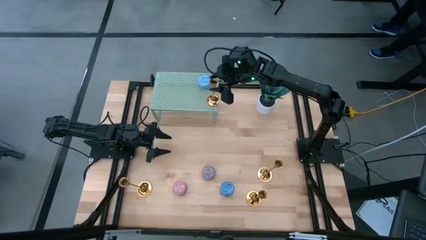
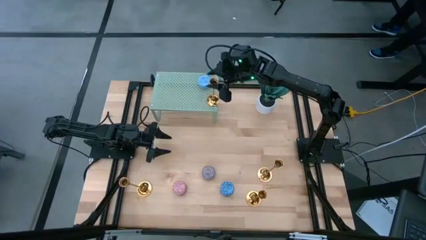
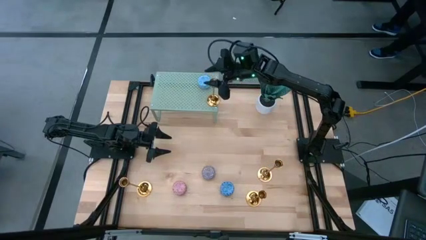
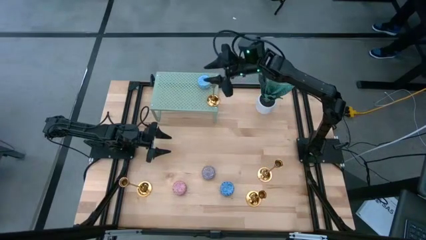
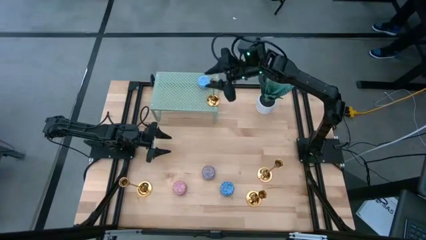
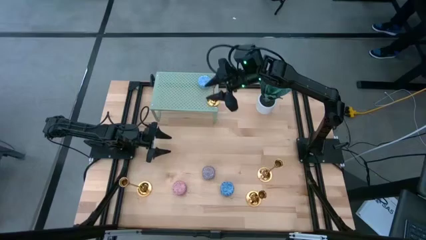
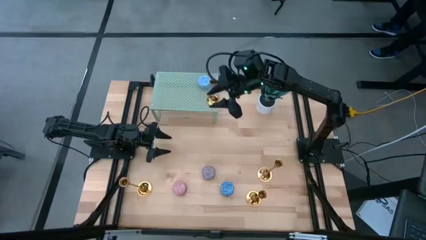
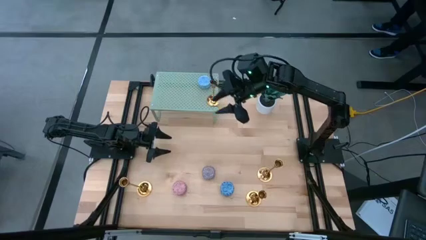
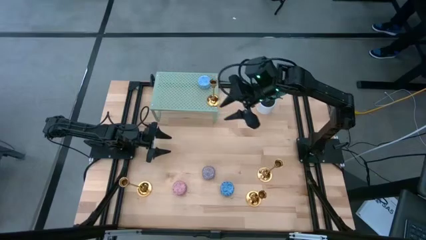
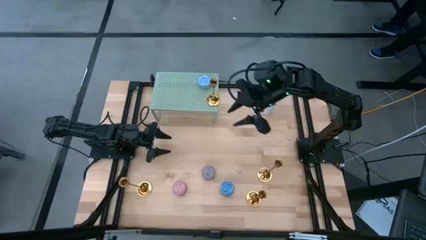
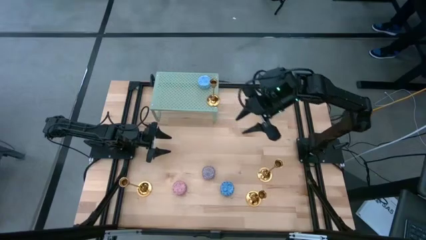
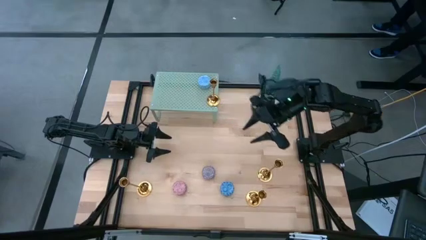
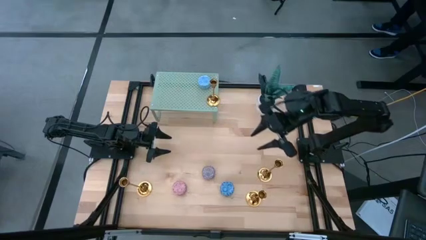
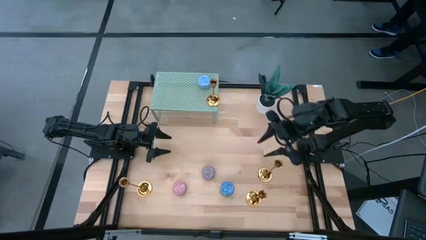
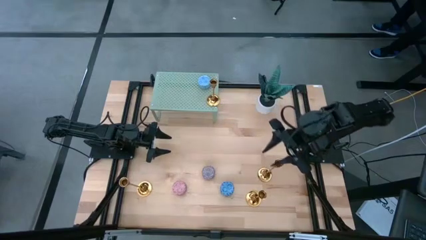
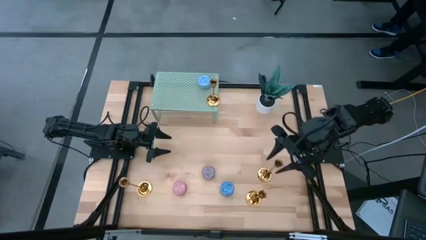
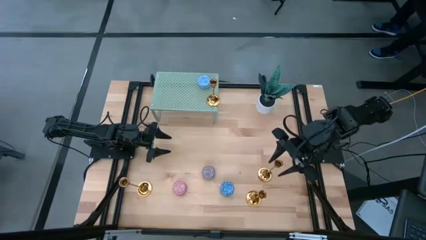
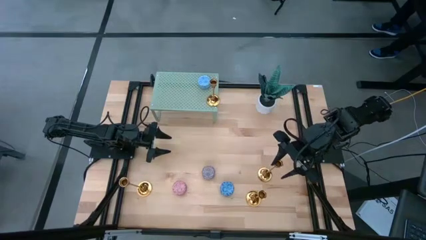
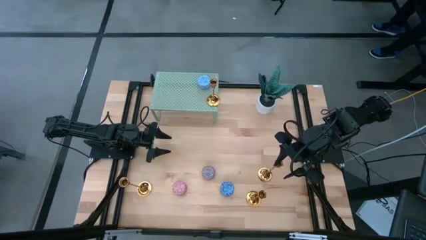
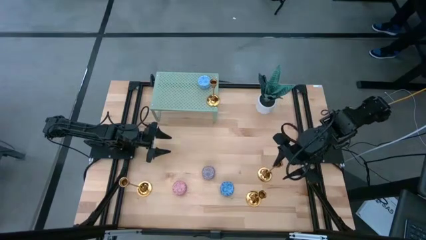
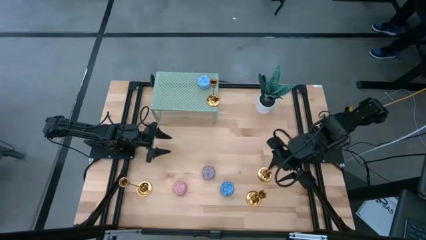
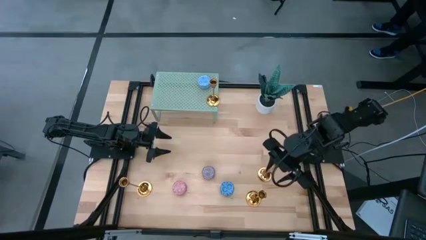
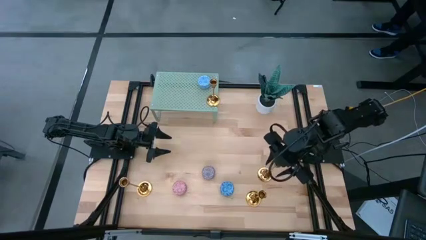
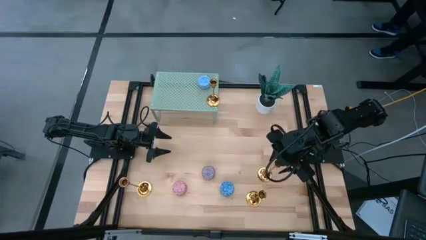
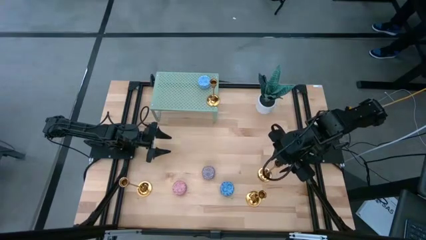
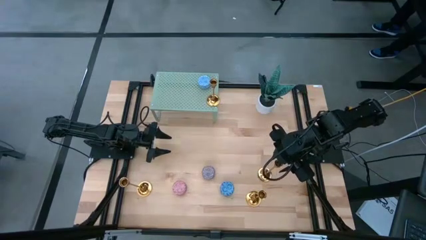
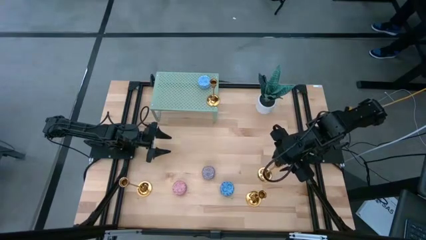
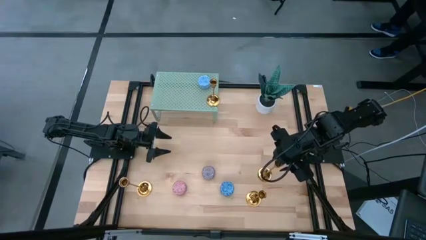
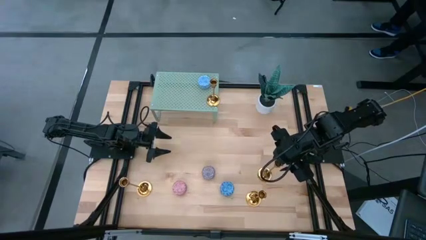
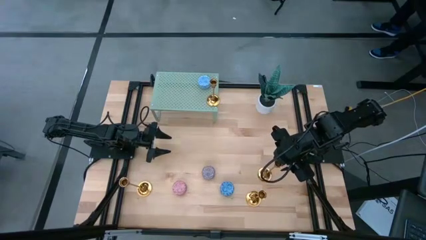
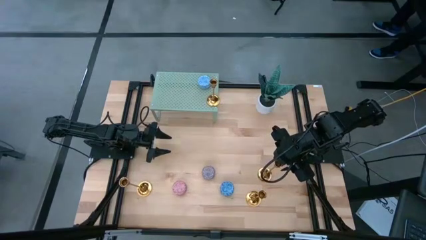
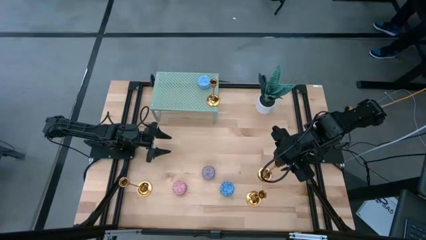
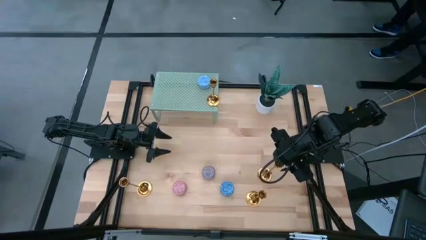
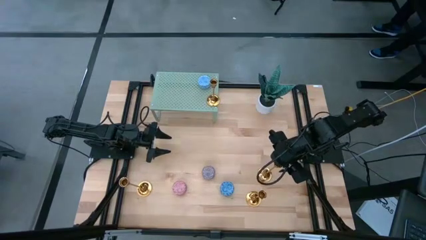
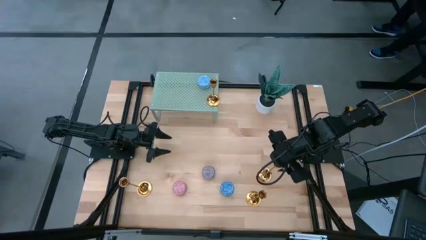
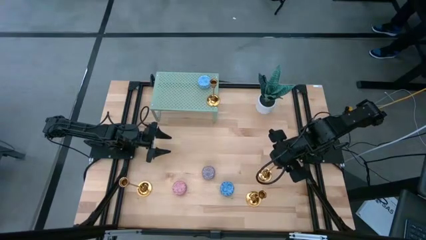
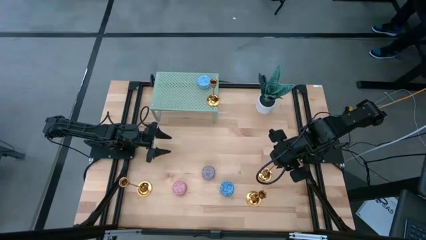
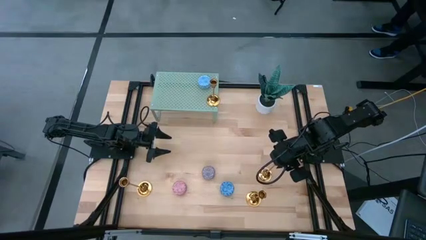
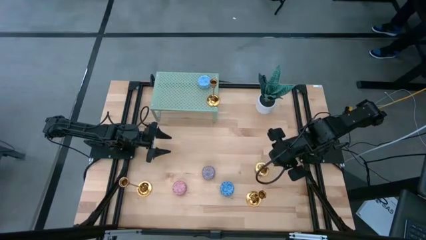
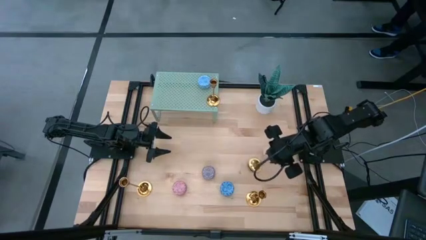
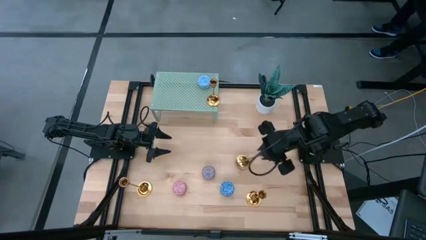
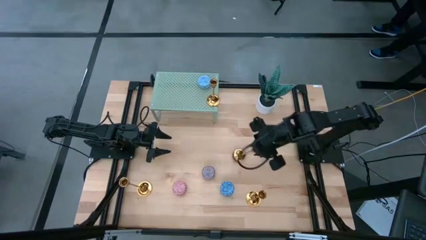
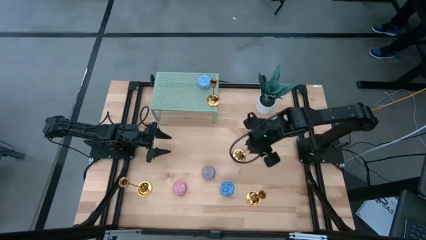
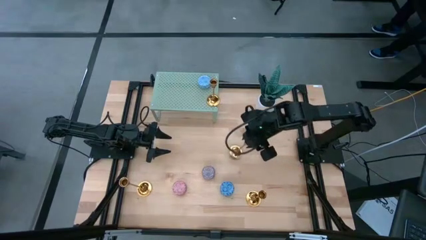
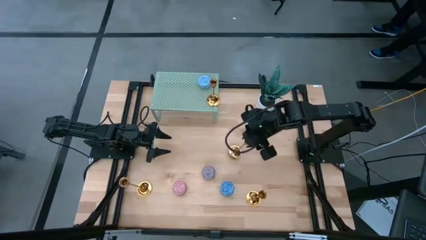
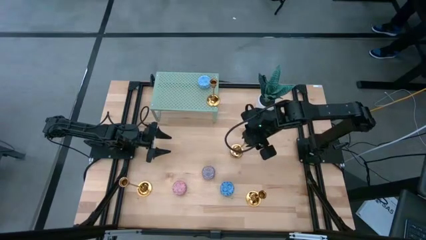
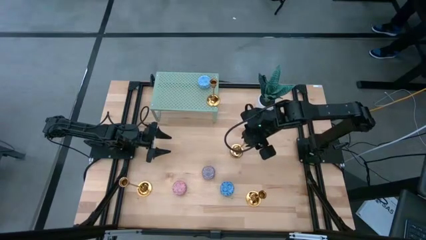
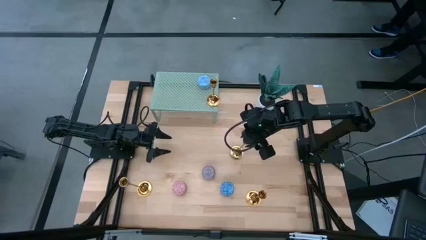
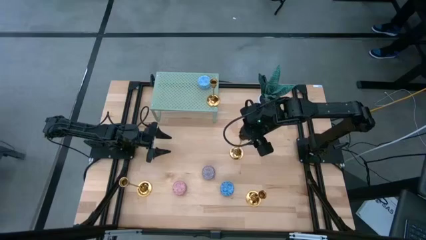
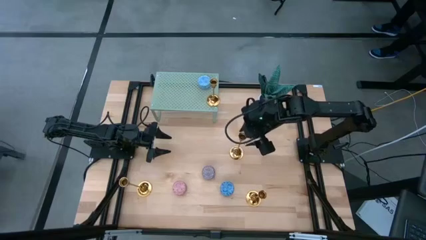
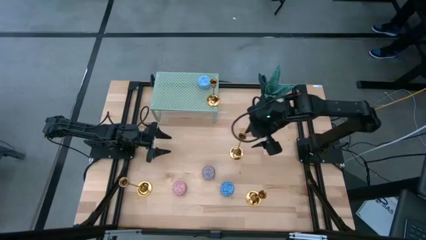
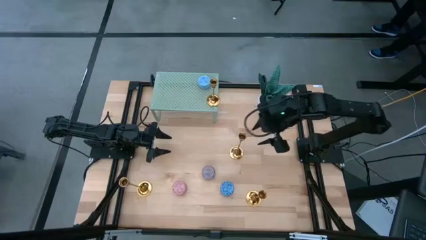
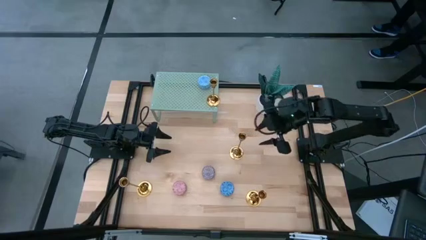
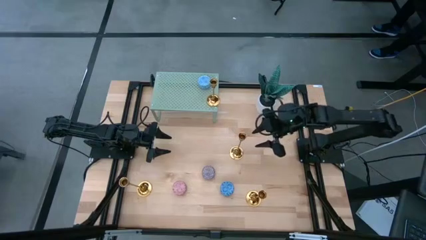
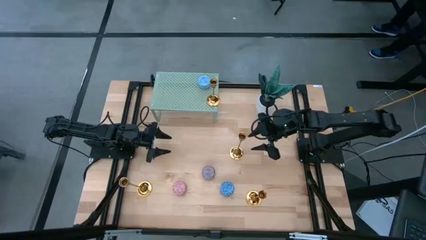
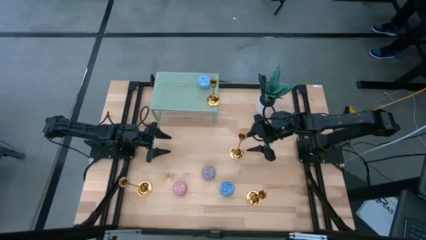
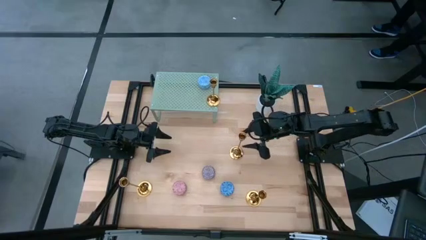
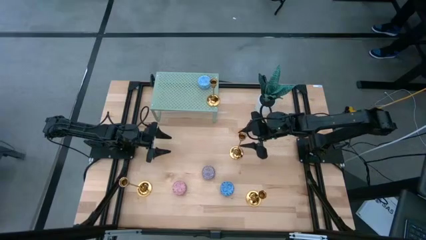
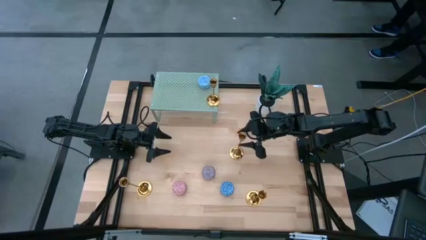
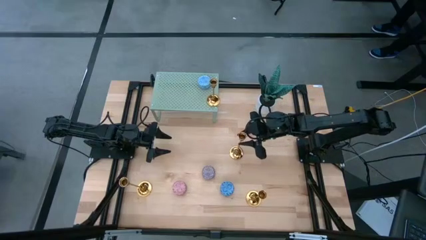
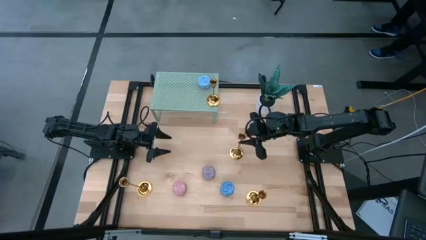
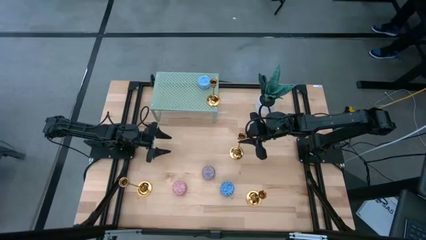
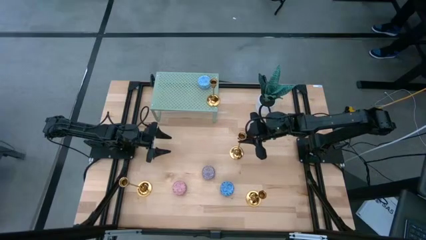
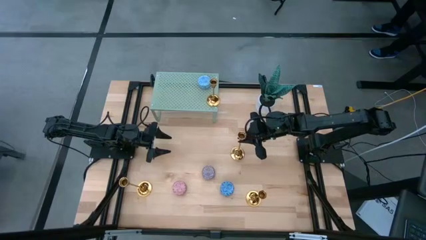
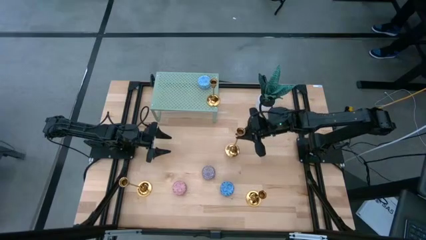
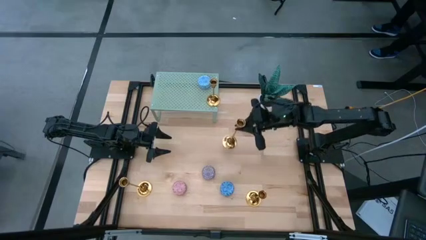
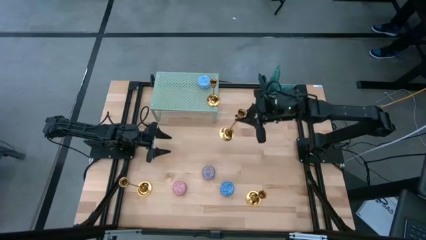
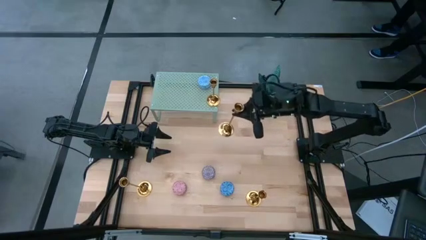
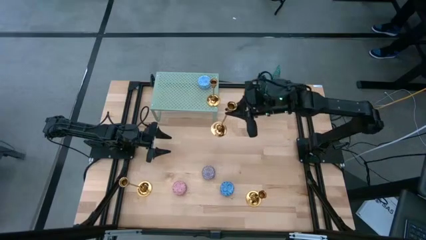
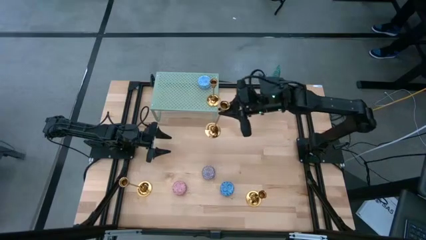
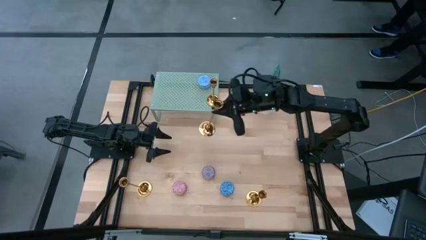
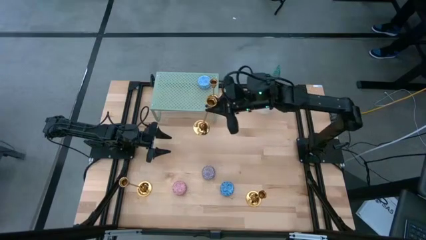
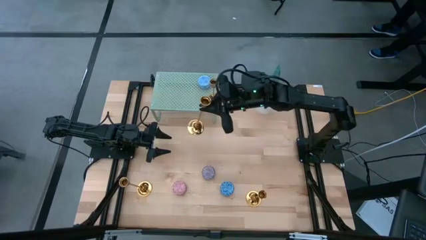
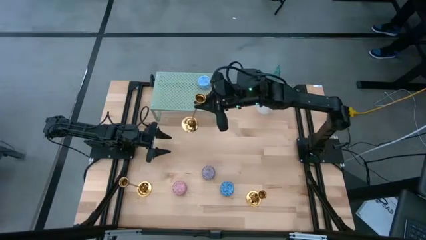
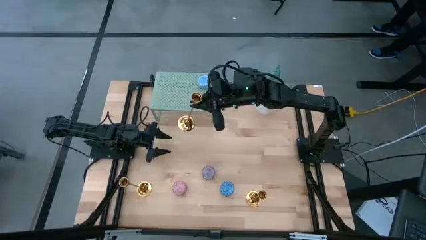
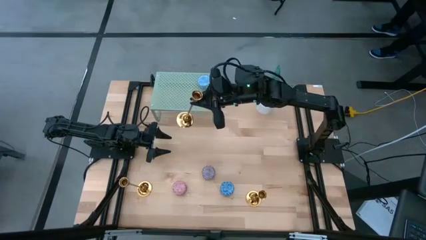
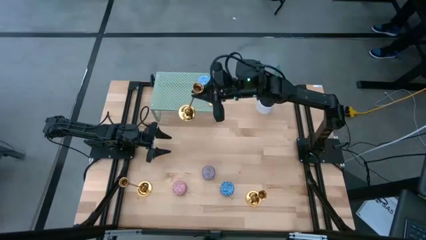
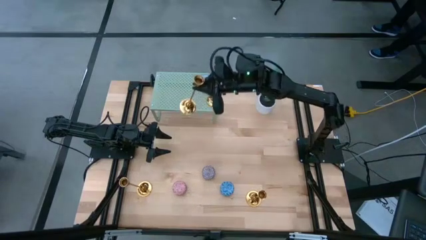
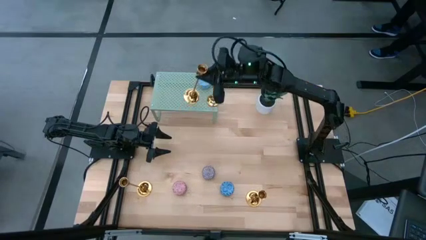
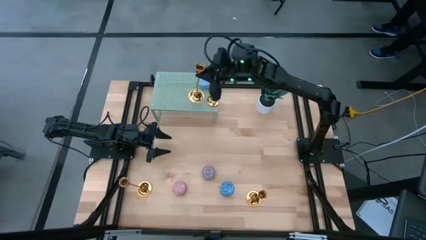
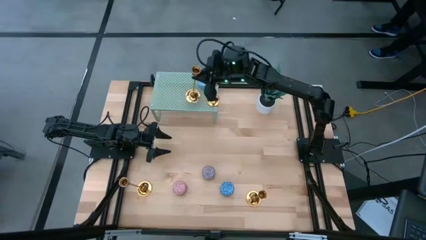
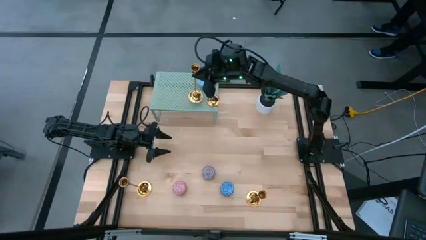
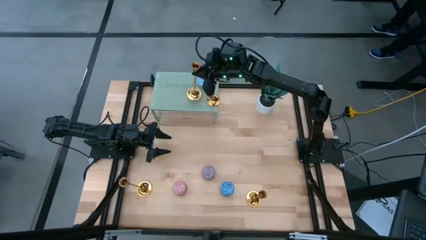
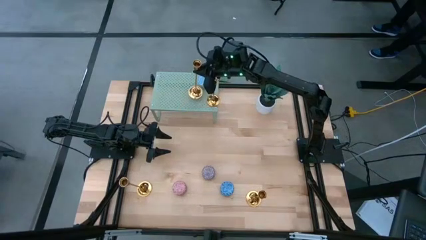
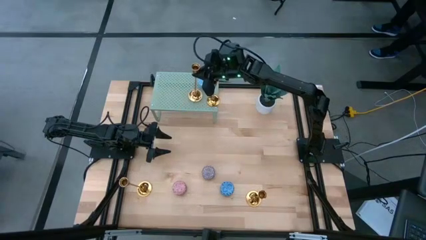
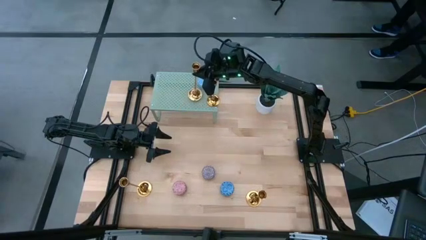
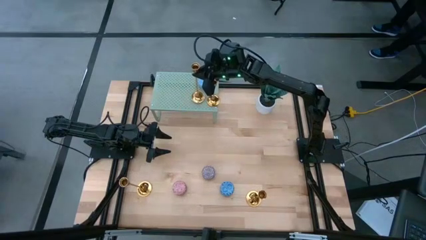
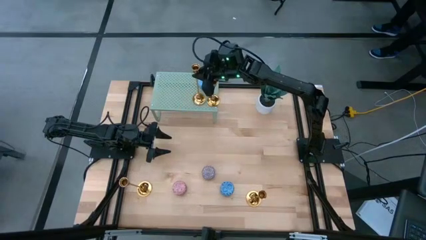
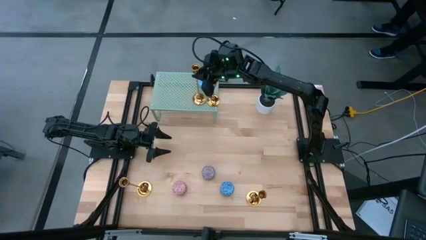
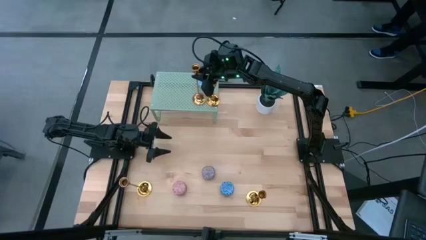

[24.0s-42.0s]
Task: Pick & Place candle stick holders
Put the gold candle holder on the shelf
